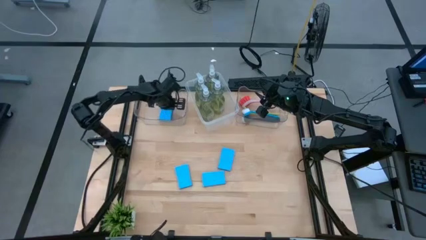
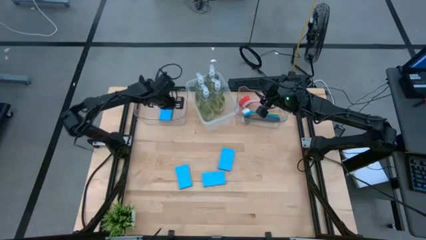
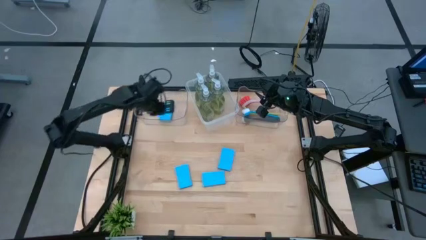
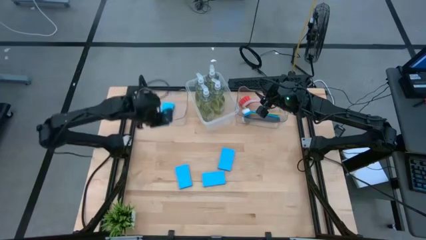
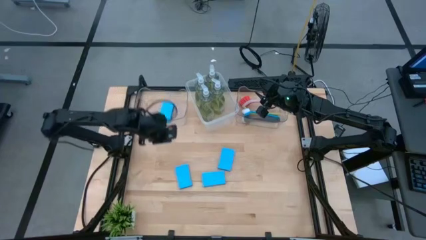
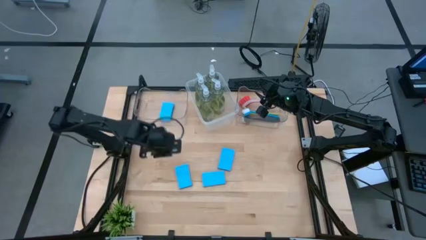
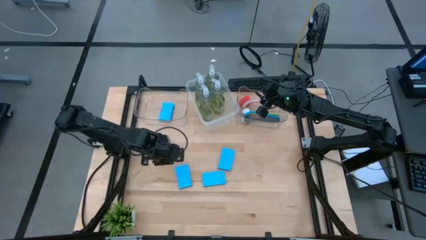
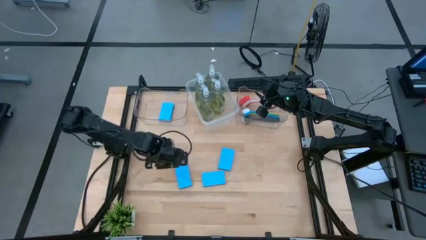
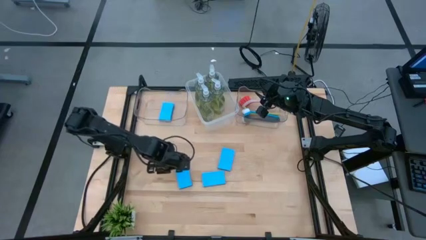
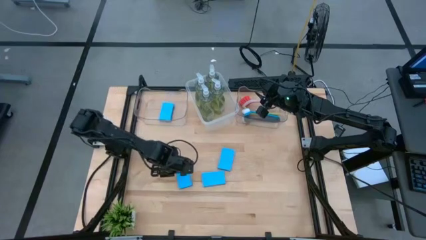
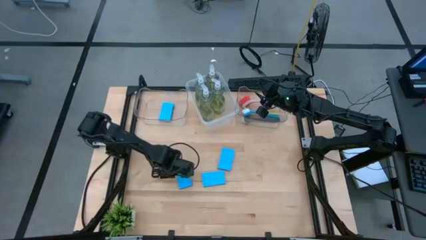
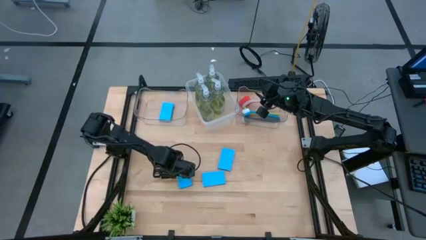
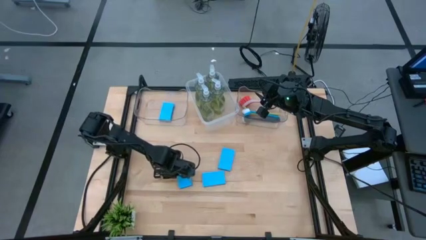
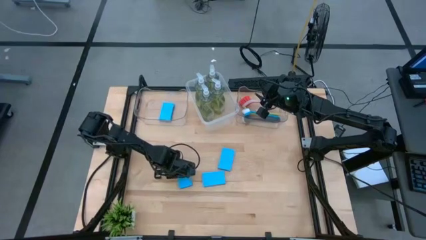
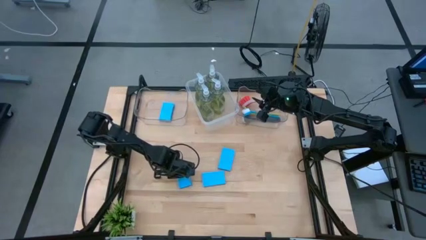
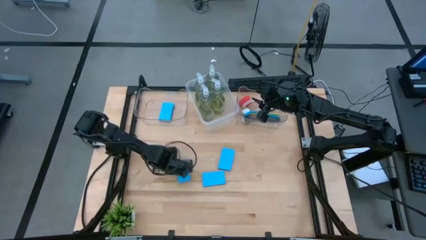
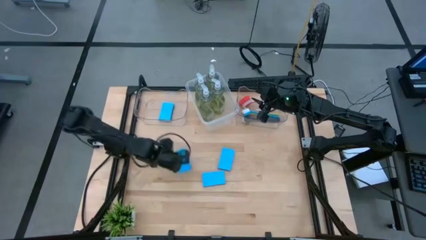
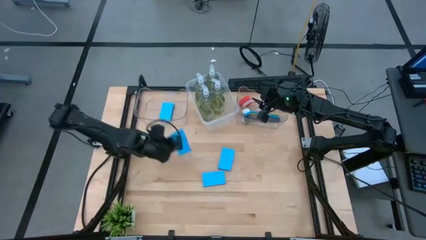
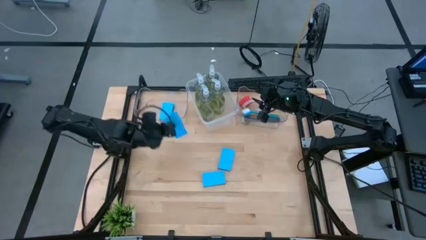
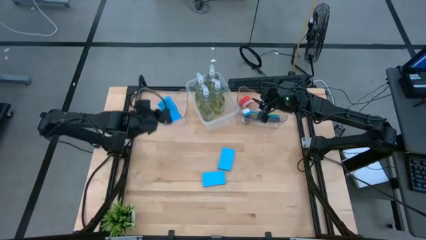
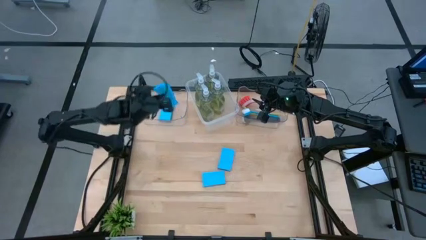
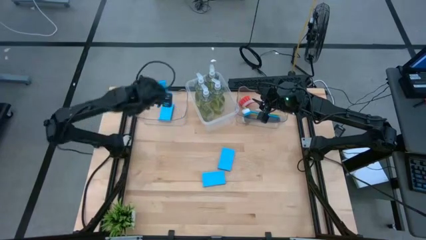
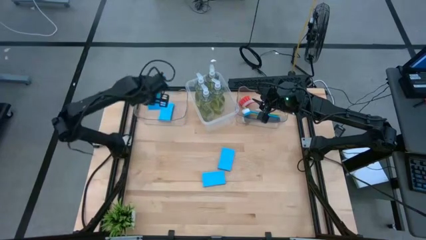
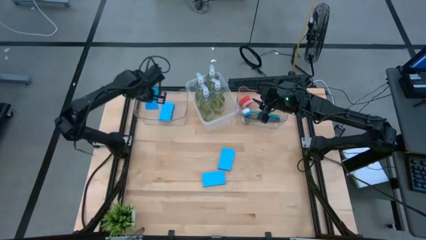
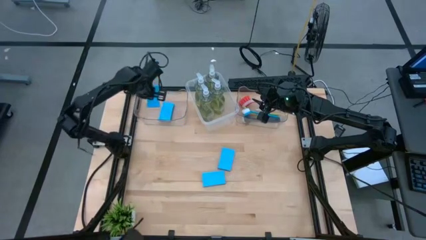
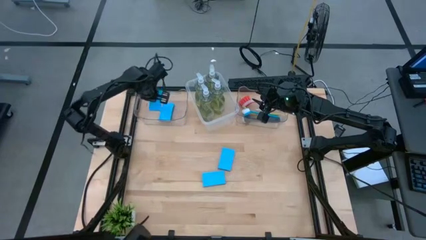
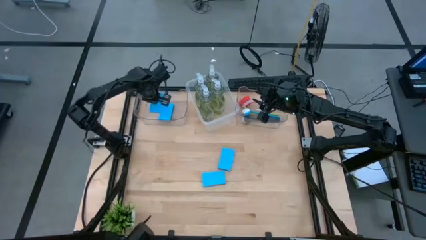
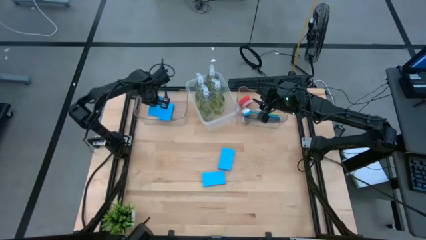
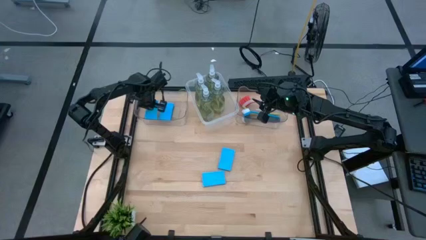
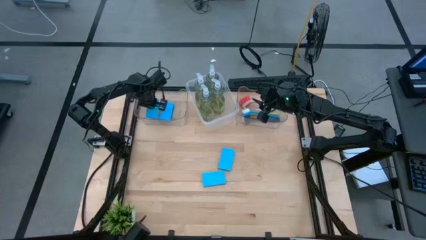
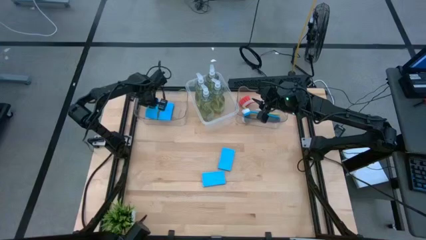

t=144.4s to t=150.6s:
Task: Pick & Place Kitchen Sink Supplies
Put the sponge into the left transparent bin

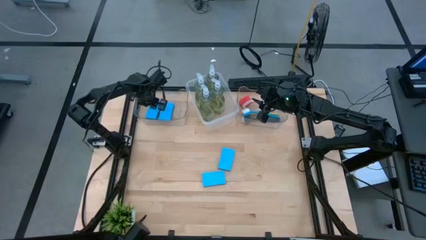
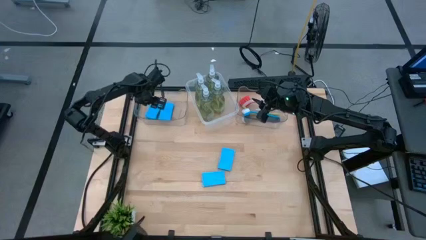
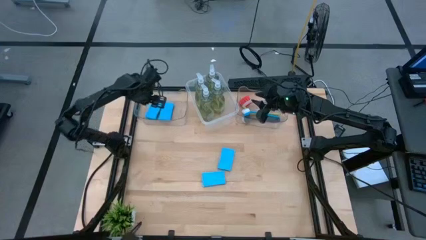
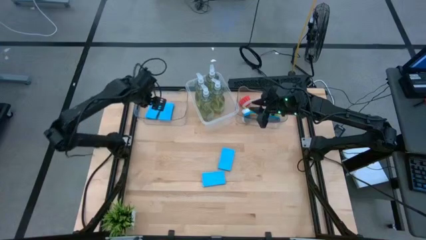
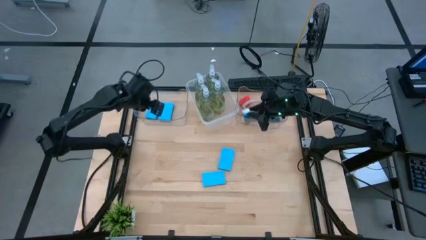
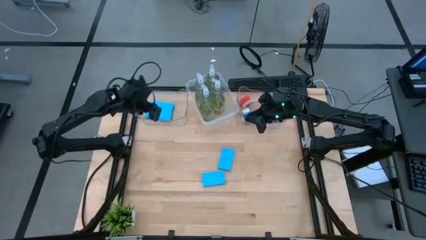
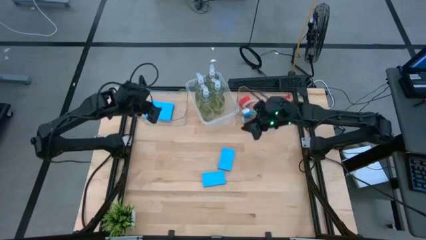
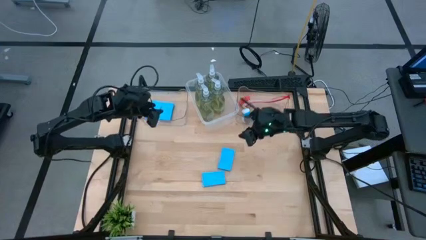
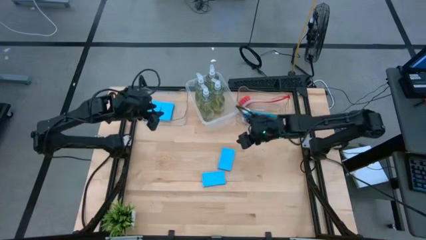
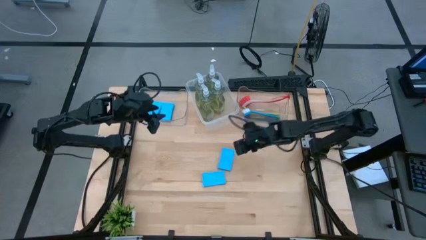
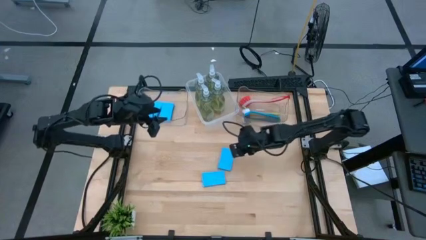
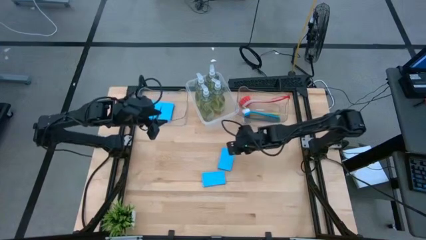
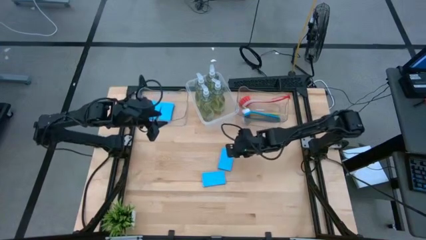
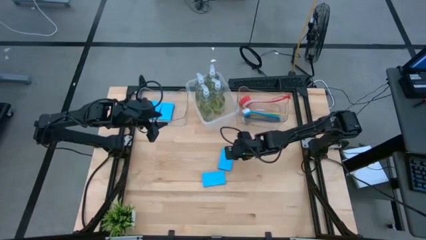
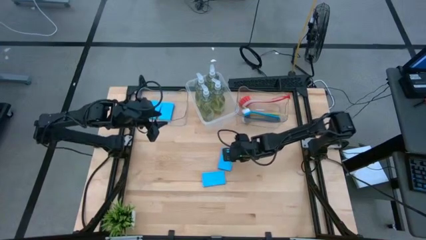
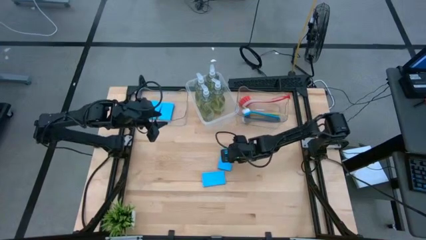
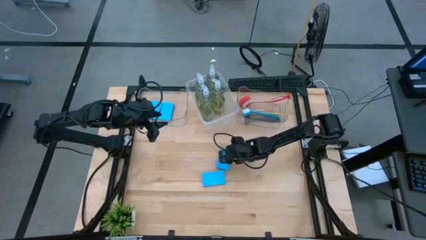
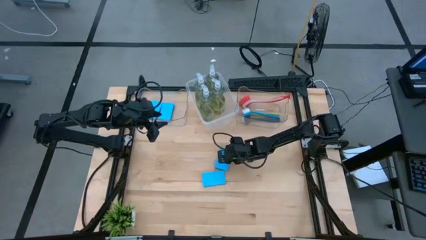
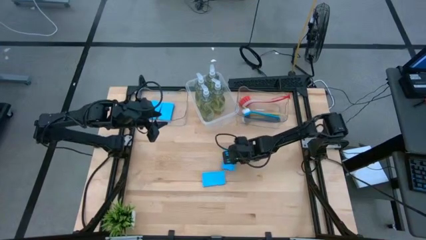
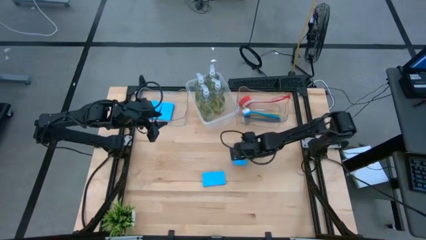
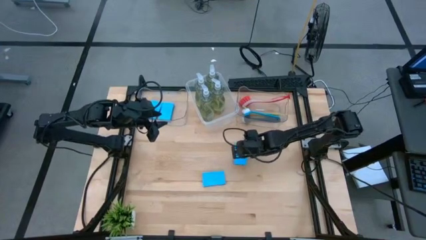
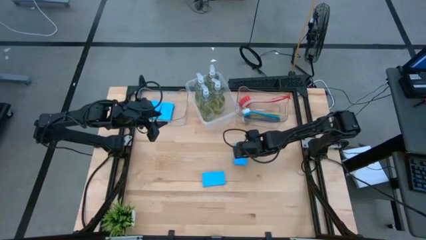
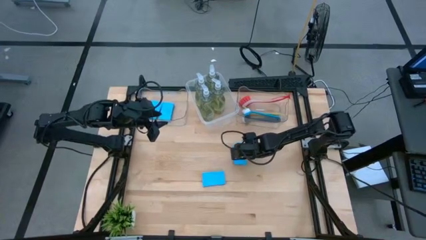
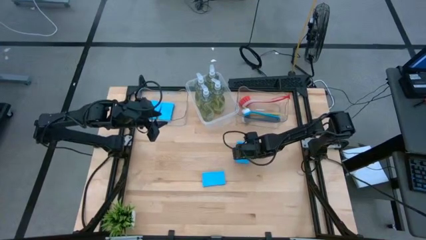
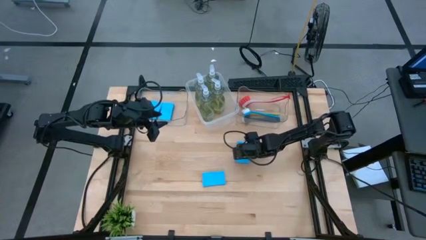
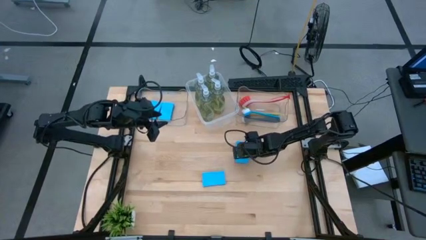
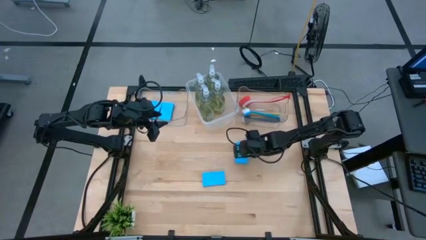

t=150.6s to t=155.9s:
Put the sponge into the left transparent bin
